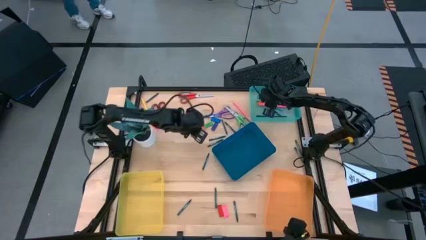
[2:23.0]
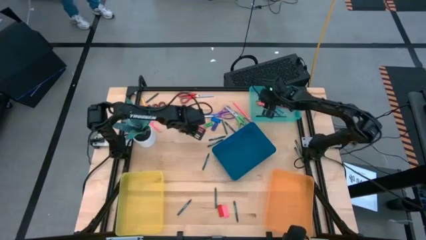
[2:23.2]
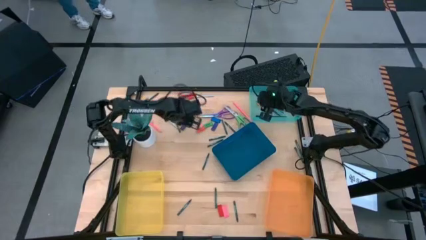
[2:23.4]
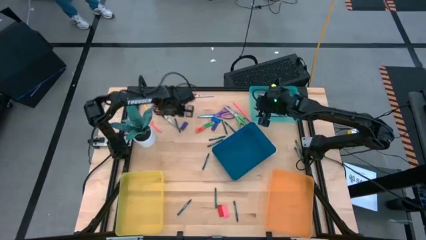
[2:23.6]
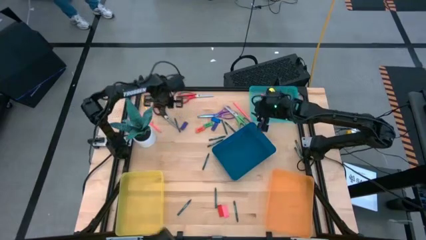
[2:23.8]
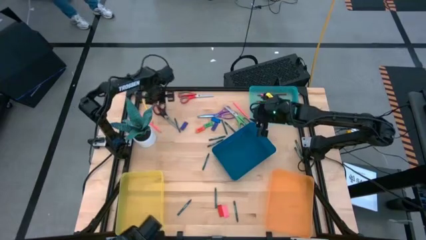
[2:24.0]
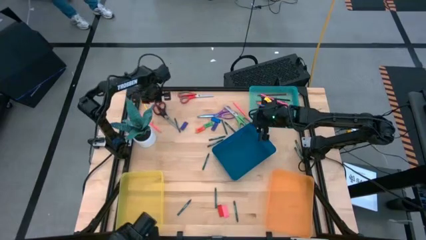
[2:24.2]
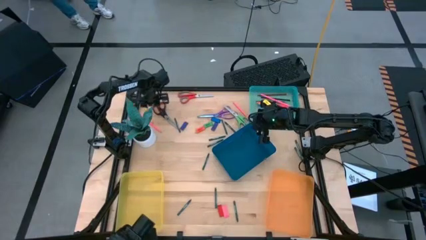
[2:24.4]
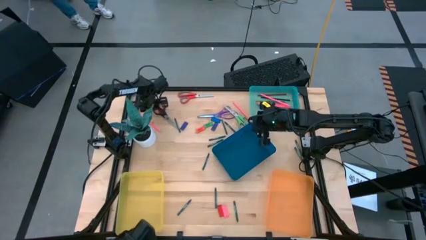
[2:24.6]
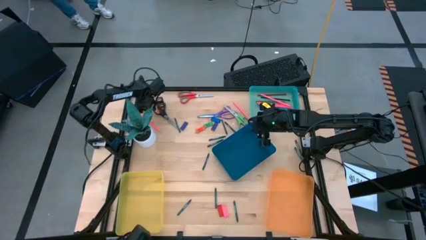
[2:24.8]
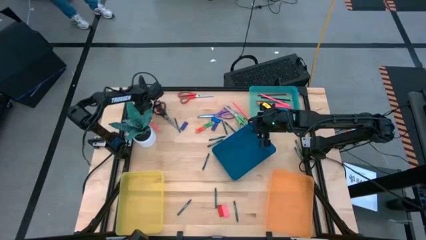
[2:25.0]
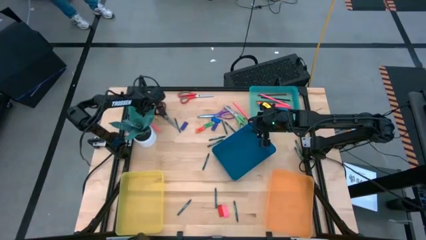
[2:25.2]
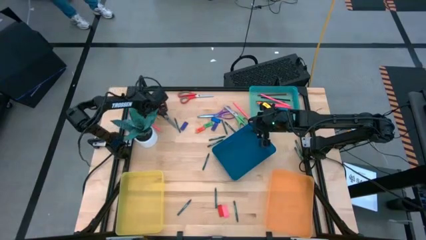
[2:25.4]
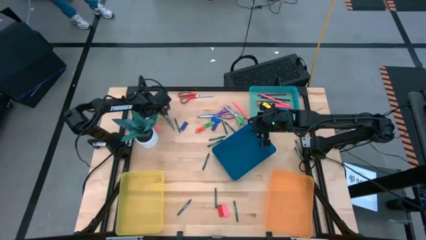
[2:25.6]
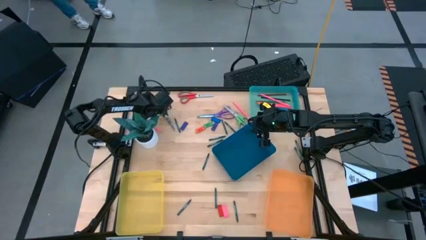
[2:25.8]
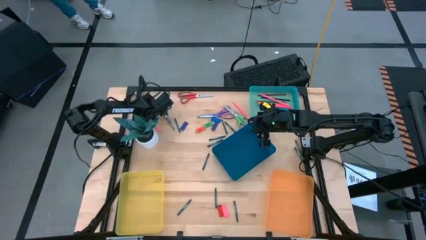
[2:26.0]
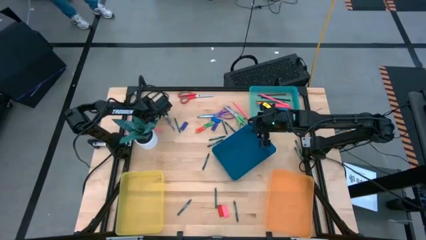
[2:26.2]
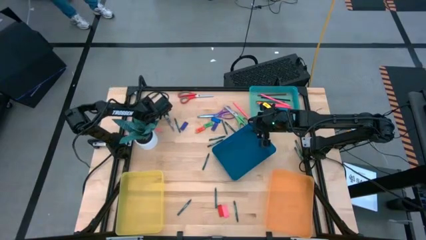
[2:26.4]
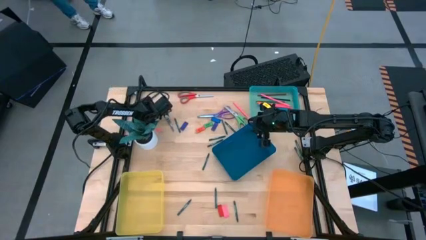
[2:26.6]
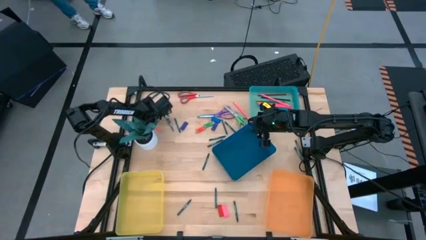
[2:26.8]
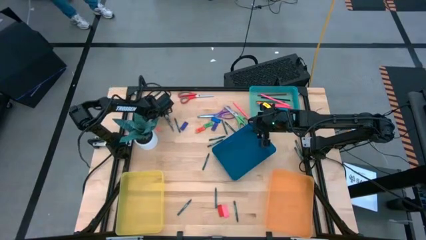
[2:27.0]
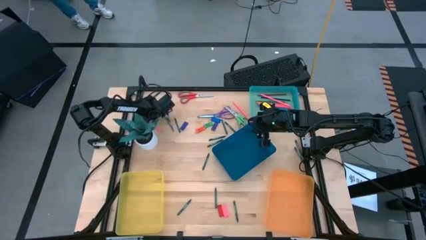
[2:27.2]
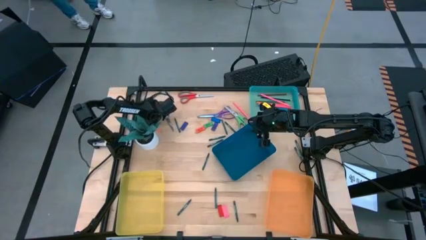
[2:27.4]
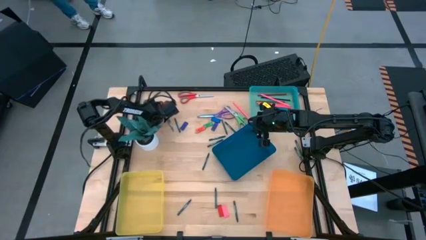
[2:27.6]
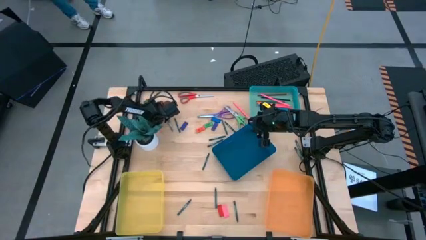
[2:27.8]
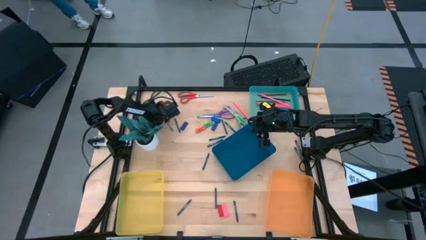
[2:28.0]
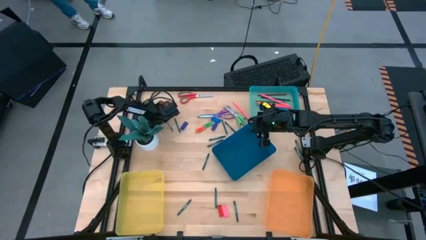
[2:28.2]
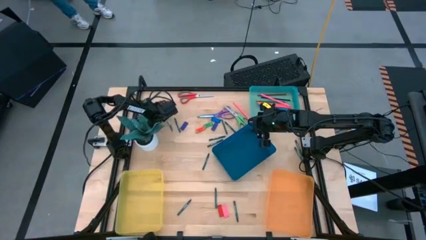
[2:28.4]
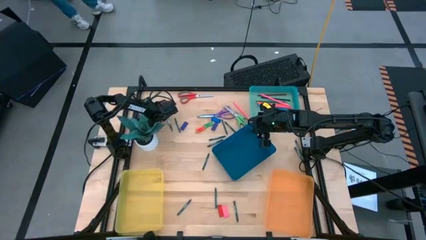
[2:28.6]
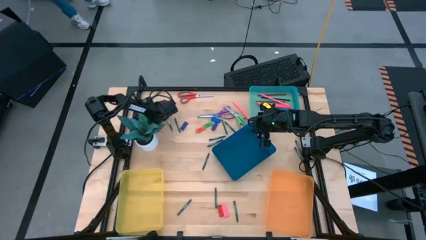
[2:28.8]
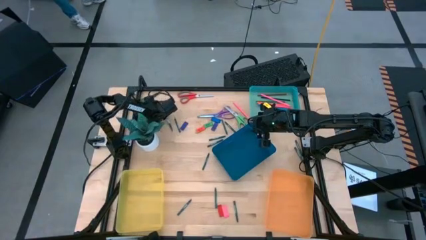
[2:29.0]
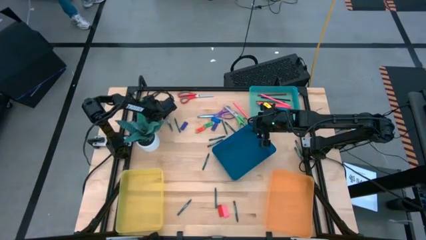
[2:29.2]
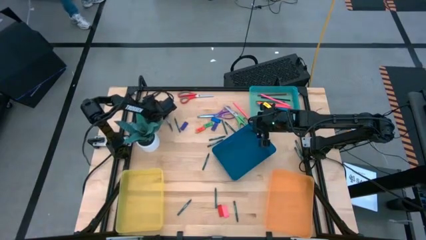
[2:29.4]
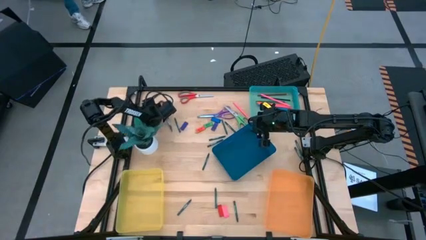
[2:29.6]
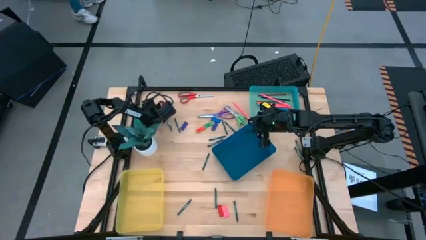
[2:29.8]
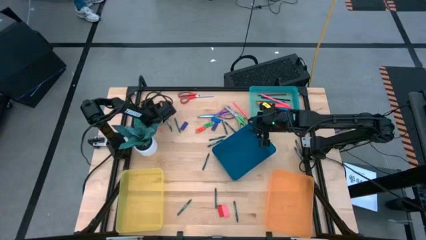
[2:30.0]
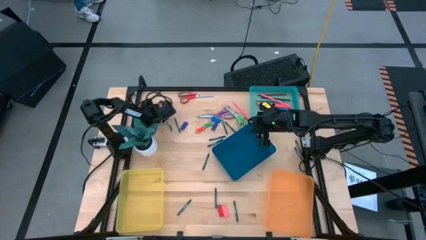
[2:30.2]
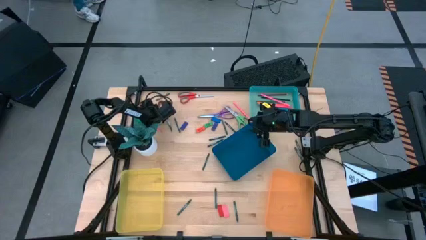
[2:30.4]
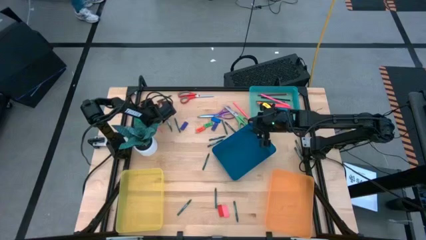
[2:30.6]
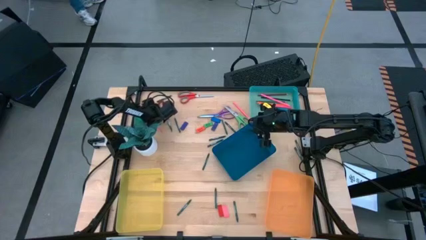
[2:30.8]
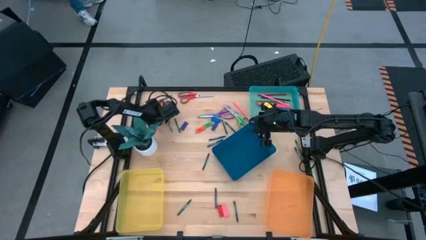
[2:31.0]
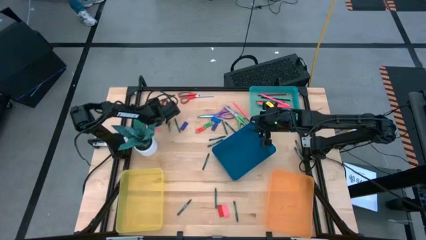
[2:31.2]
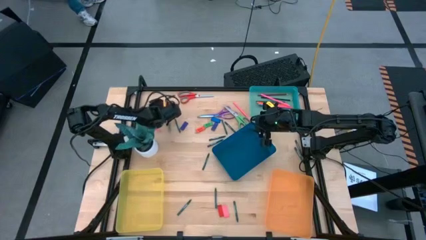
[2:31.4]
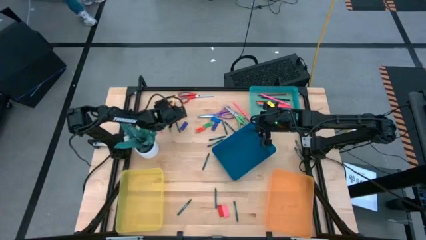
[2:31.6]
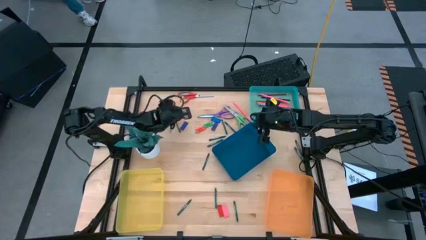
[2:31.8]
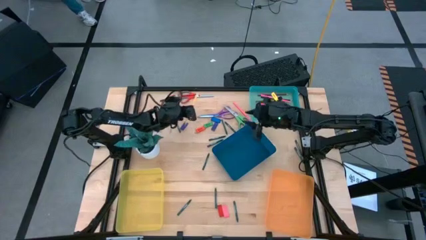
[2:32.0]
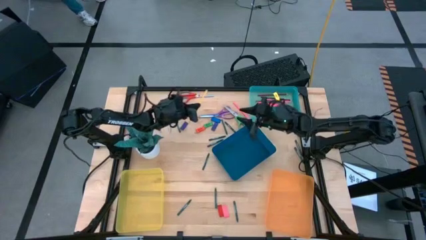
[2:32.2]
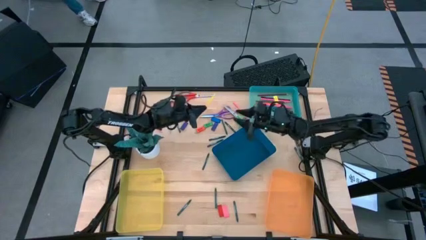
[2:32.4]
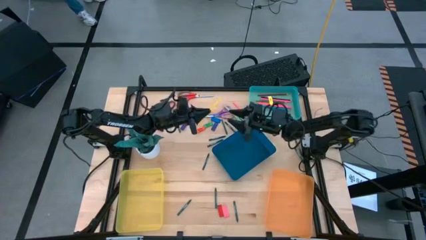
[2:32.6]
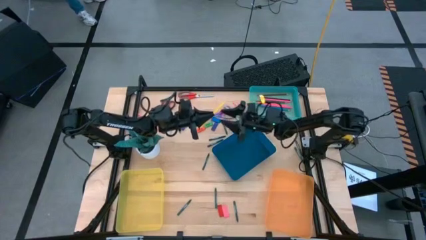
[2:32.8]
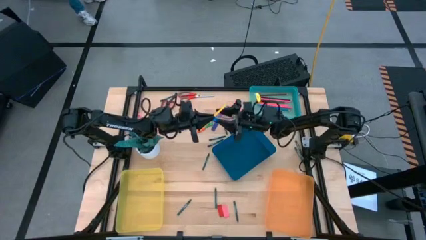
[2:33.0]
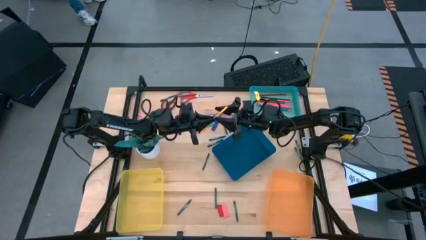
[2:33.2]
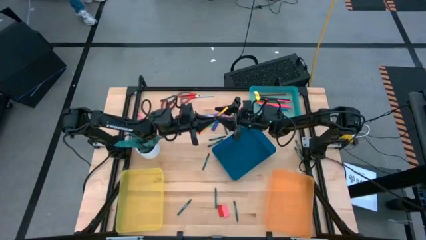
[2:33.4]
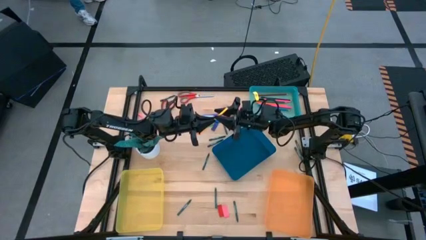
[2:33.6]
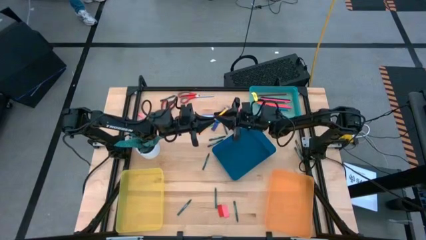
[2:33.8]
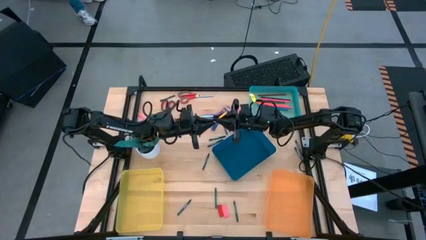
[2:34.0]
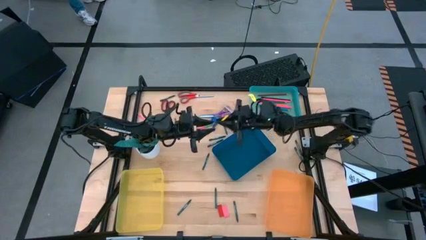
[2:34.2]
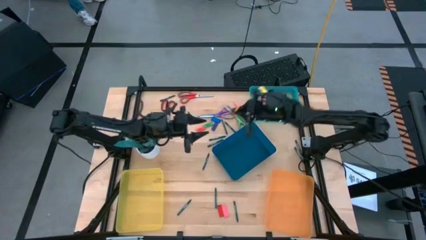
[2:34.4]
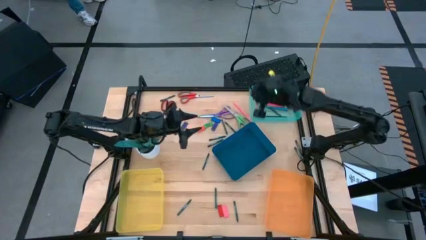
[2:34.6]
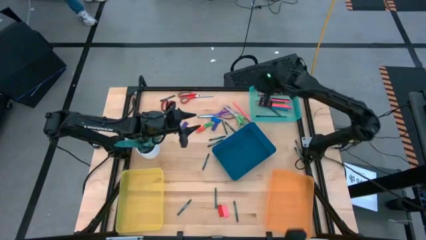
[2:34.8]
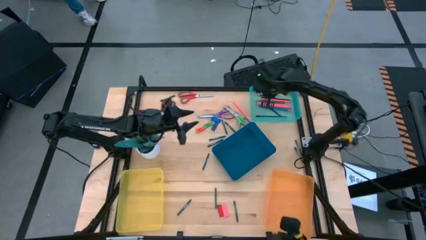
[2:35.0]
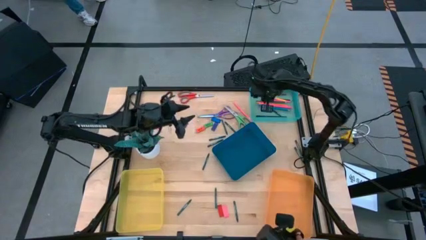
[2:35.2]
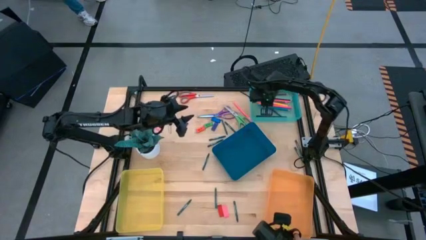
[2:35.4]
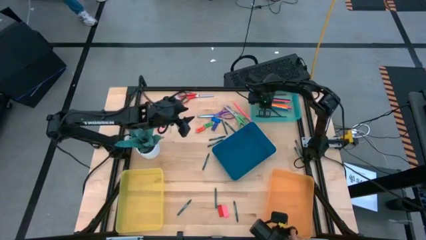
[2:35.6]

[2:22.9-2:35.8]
Task: Sort crayons/erasers/pens/pencils in bins
Put the yellow pencil into the green bin

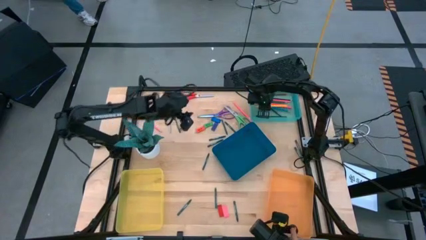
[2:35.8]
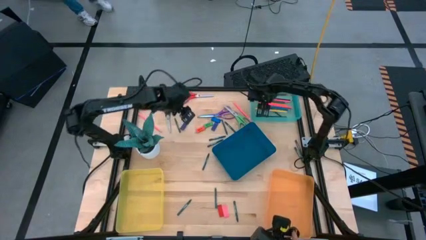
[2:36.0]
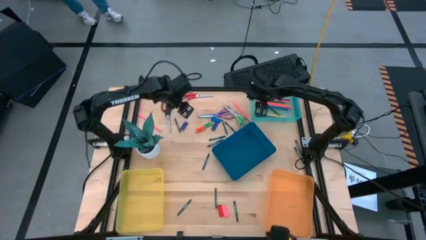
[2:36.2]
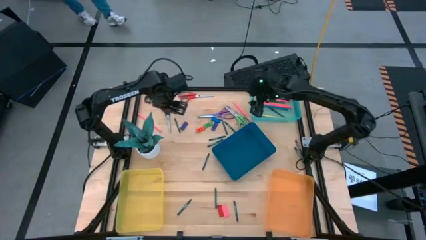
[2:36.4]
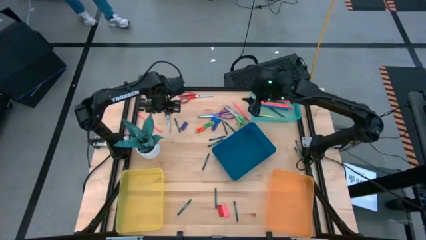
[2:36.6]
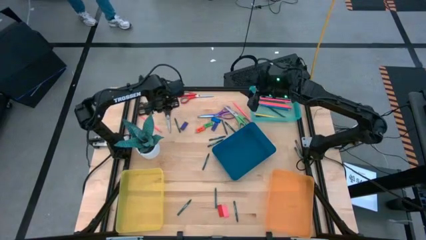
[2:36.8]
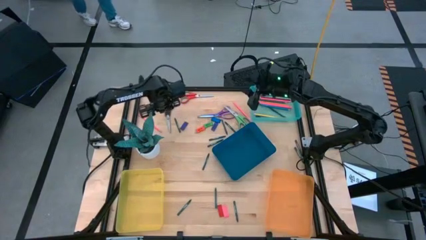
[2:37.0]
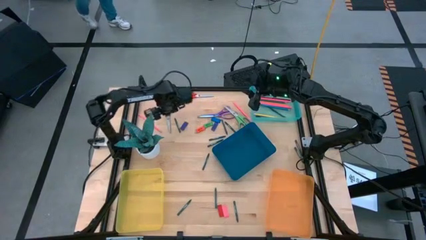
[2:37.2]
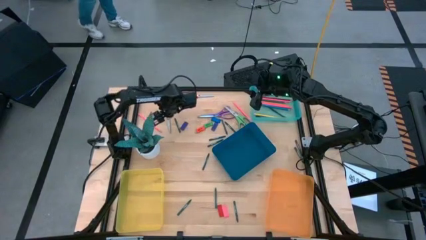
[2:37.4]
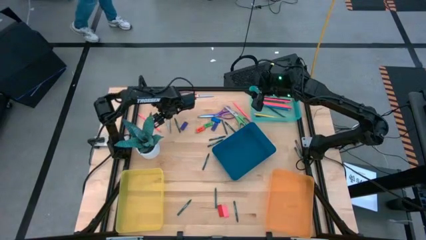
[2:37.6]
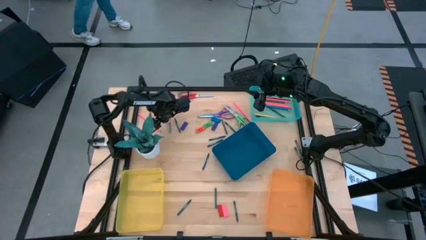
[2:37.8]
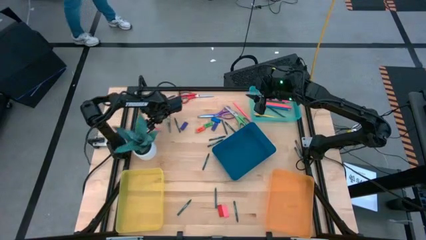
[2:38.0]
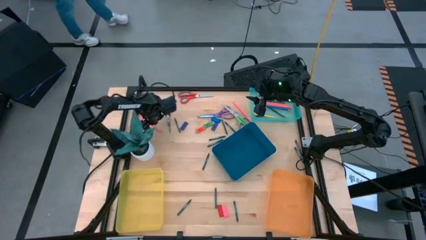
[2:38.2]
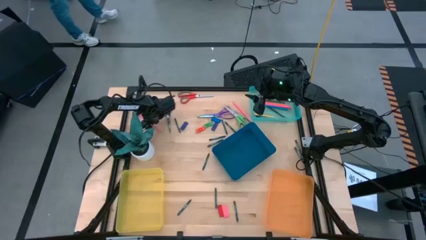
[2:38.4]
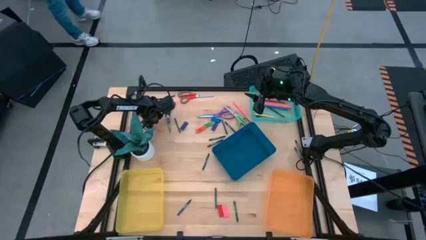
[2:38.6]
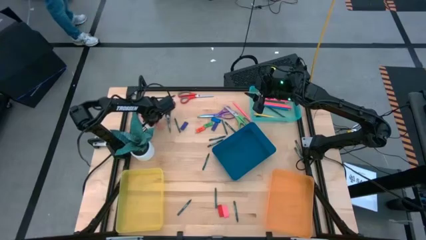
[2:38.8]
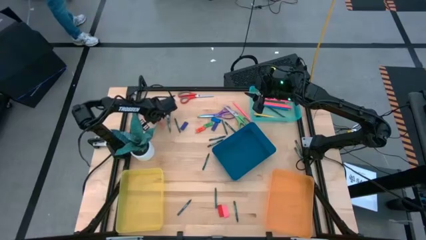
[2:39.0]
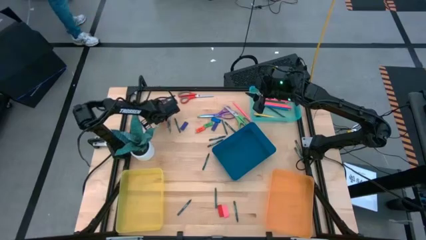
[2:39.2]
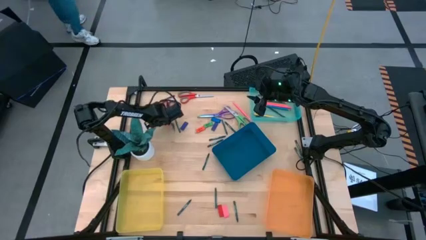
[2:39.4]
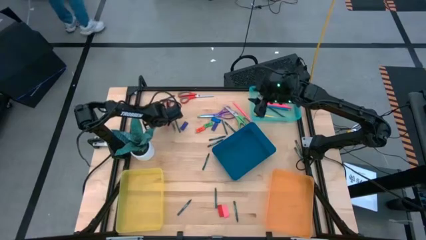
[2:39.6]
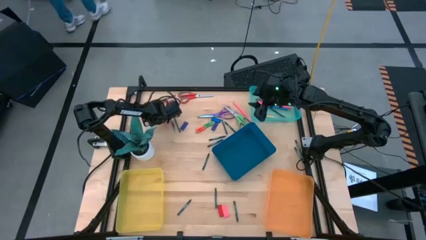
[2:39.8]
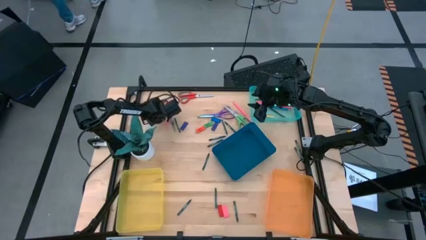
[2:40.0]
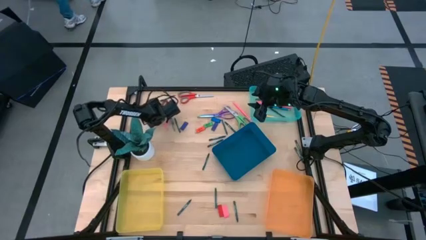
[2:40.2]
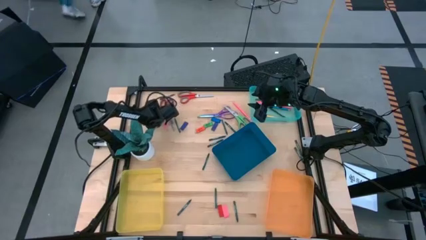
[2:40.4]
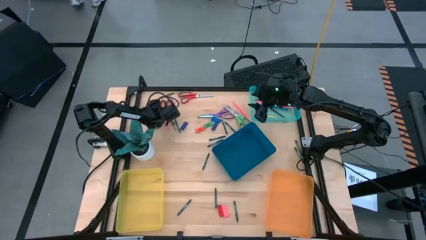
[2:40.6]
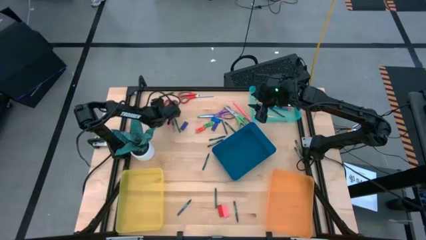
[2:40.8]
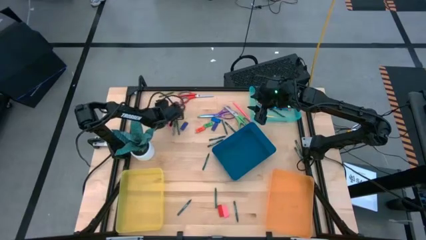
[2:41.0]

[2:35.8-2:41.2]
Put the pink pencil into the green bin
